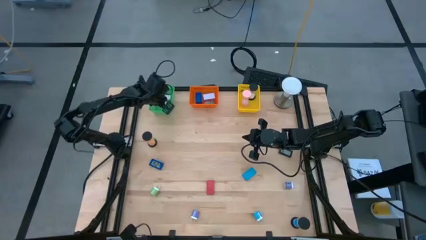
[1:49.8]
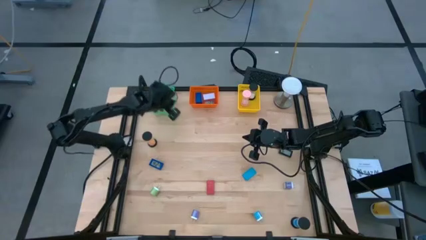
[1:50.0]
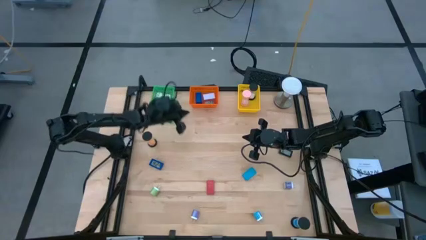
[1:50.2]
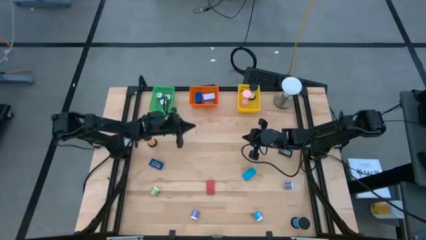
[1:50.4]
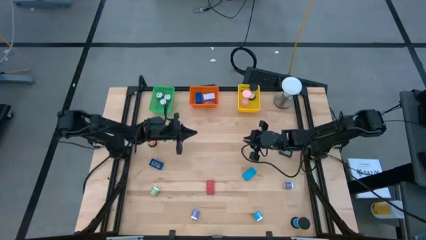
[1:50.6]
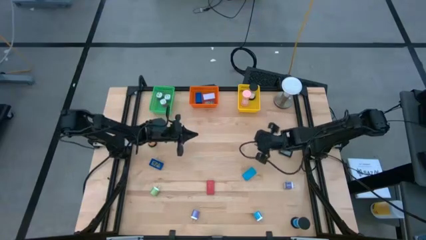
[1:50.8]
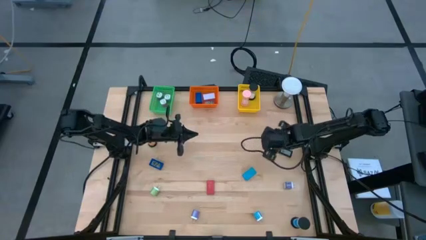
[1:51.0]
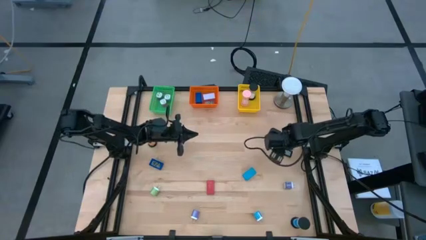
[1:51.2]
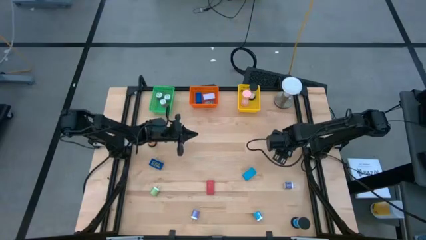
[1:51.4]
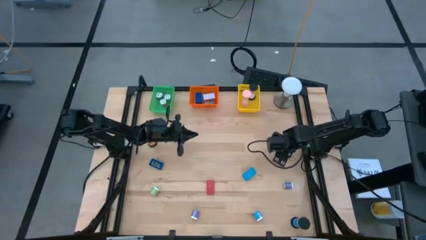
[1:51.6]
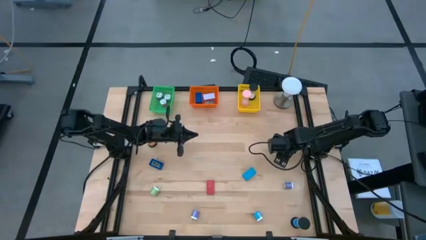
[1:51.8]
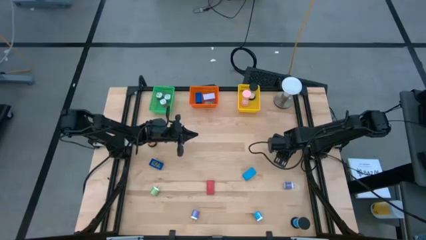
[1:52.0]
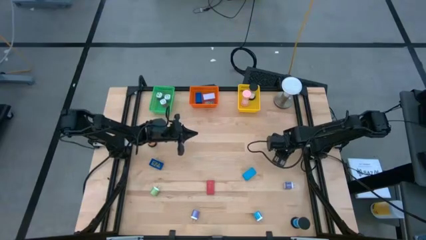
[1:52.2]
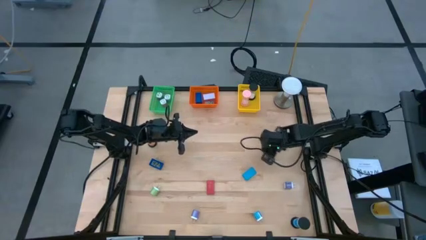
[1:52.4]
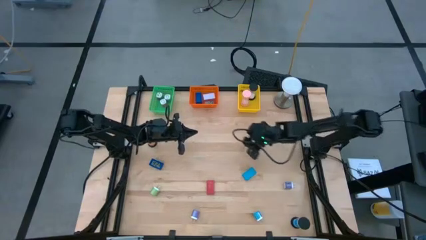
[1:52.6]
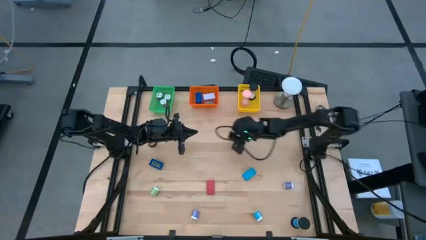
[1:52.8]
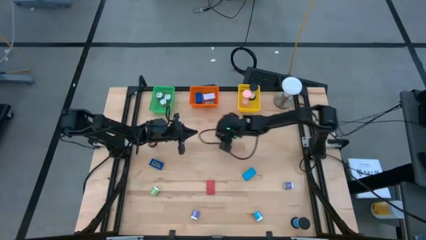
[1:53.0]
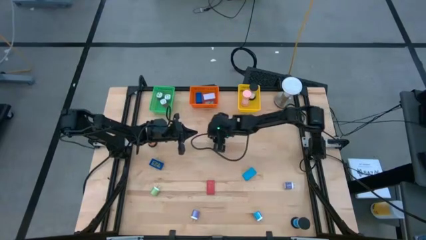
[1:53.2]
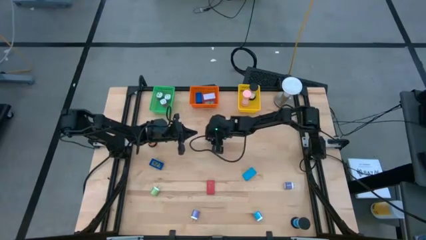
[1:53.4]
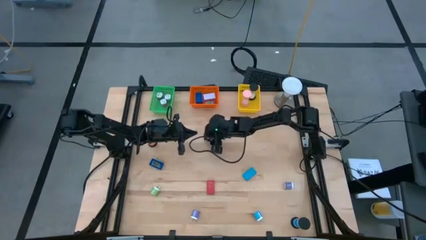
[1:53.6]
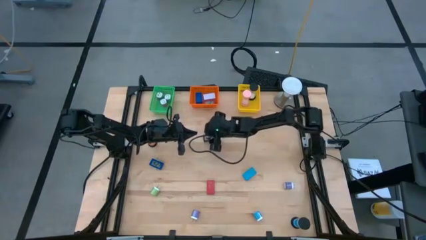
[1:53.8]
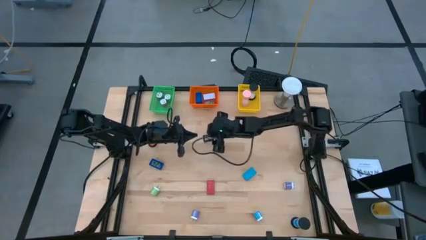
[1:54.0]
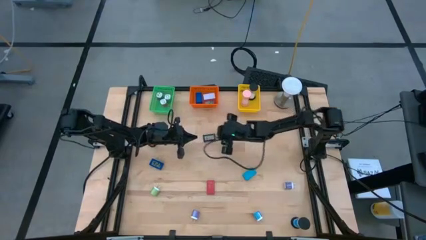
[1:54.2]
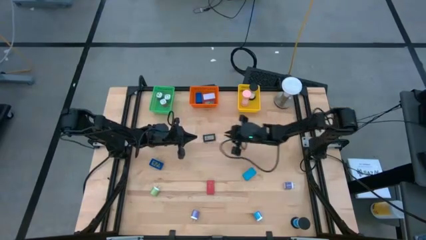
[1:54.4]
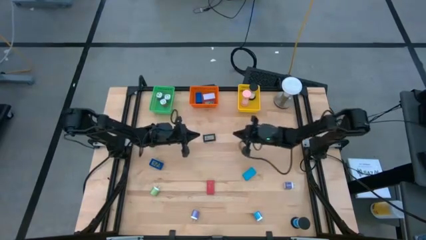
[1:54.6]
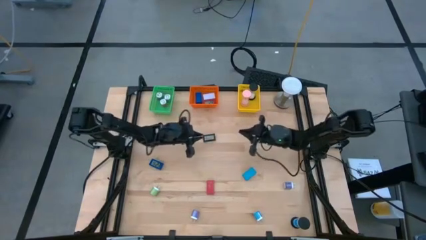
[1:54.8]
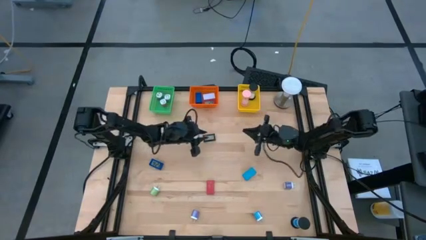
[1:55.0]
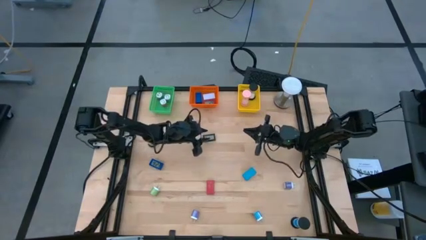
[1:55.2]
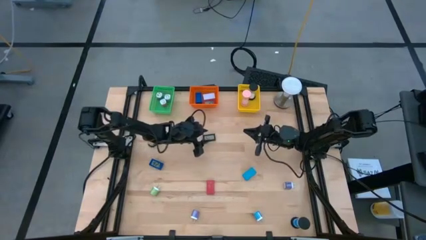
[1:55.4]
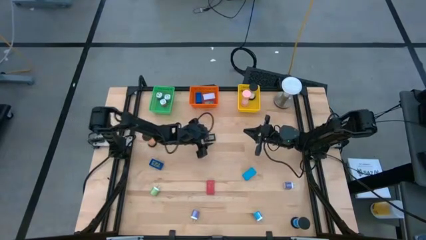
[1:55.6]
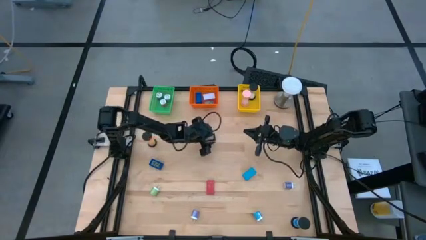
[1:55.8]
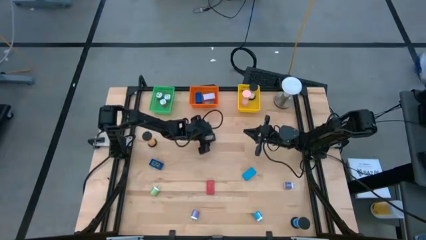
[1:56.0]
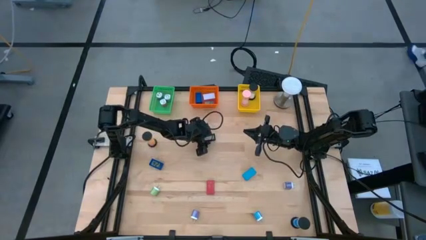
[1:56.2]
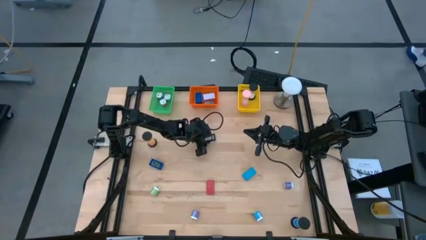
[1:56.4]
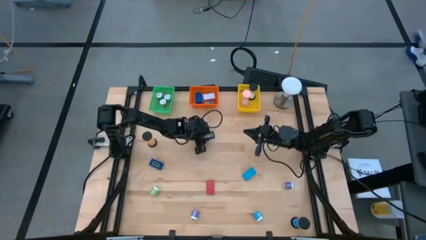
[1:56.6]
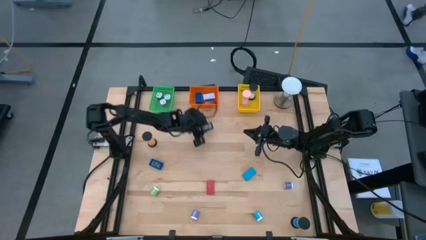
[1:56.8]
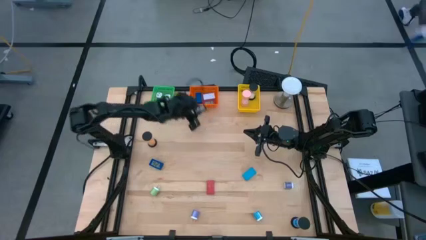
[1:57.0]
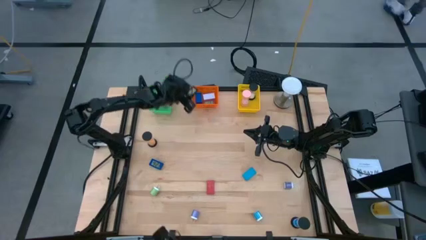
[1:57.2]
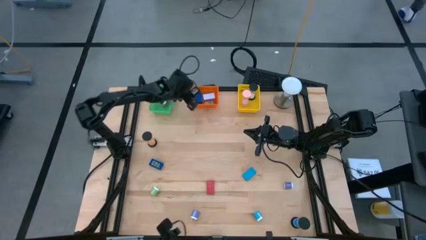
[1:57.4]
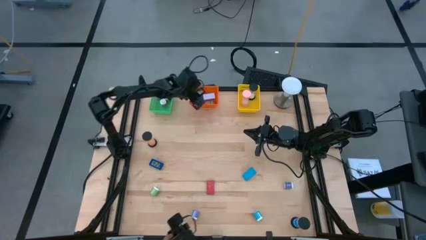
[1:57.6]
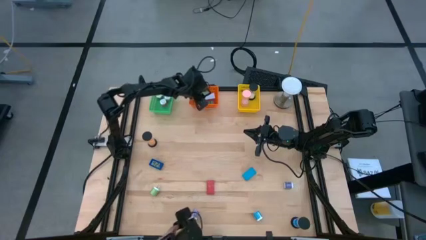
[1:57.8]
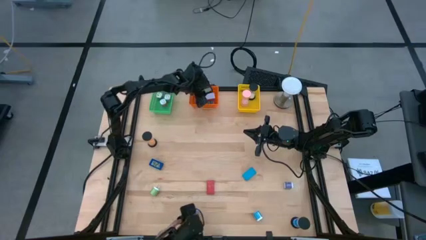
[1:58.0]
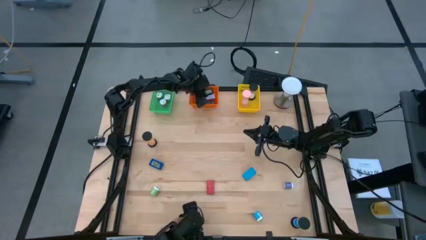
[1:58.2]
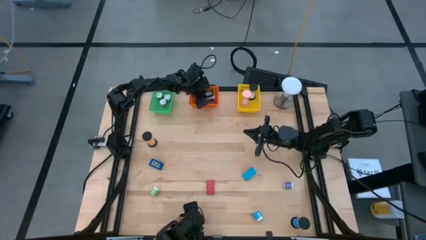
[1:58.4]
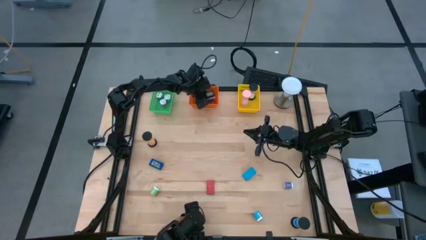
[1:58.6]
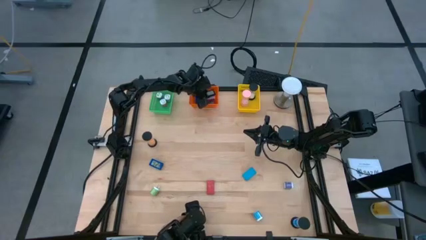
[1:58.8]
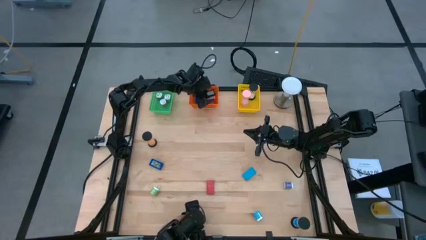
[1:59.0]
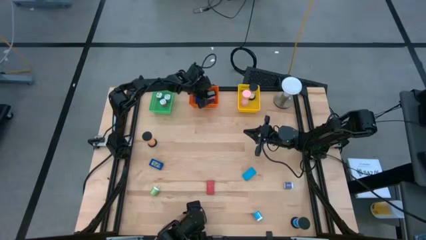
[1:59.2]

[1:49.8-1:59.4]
Task: Pick & Place Office items
Put the black digital clock into the orange bin

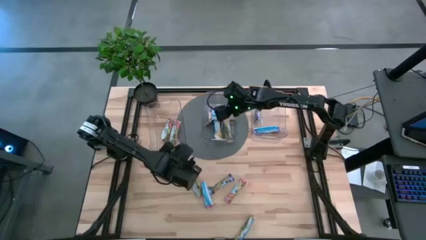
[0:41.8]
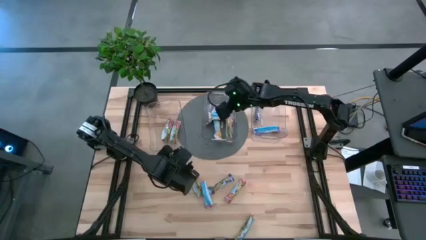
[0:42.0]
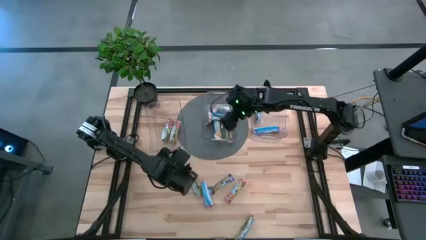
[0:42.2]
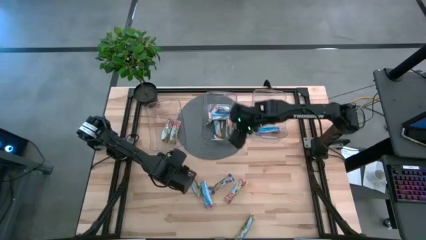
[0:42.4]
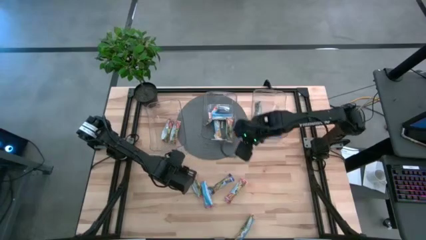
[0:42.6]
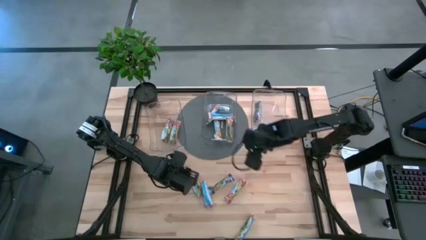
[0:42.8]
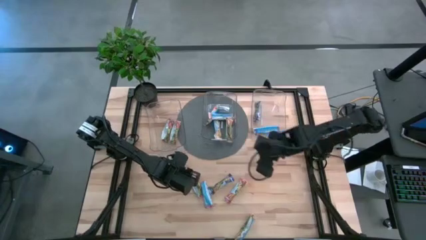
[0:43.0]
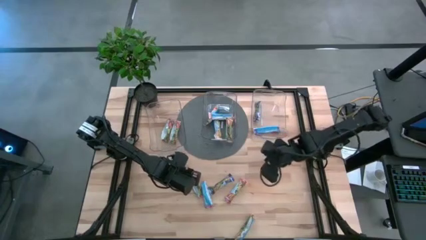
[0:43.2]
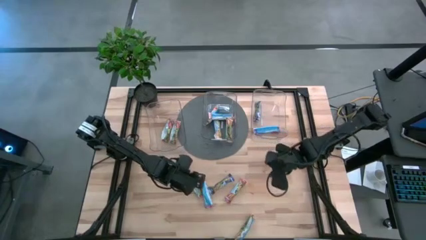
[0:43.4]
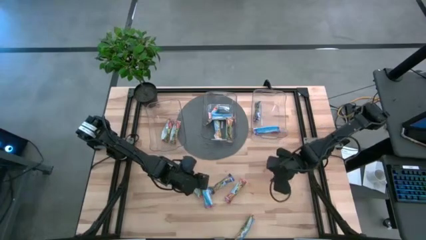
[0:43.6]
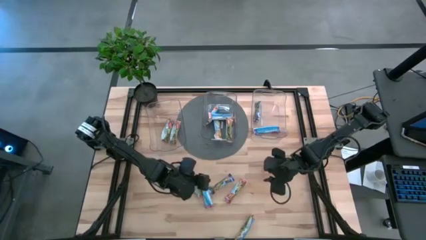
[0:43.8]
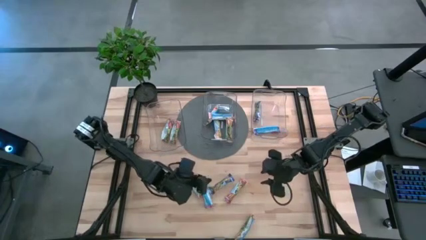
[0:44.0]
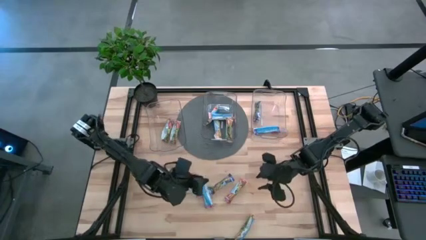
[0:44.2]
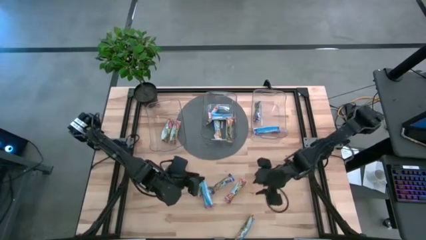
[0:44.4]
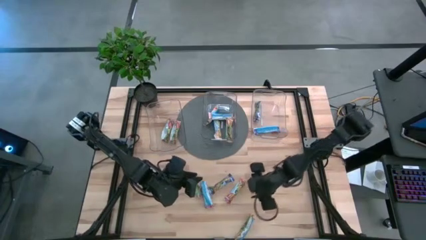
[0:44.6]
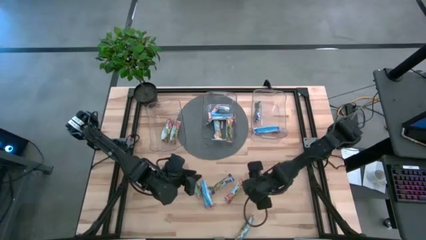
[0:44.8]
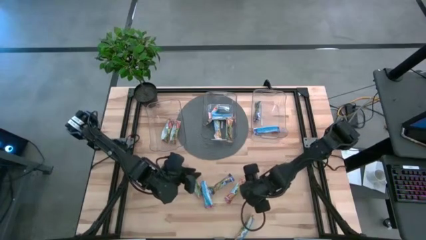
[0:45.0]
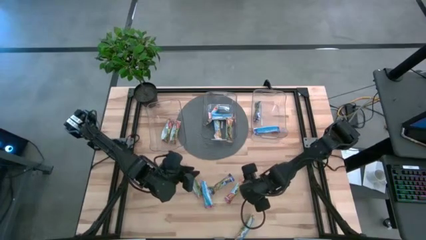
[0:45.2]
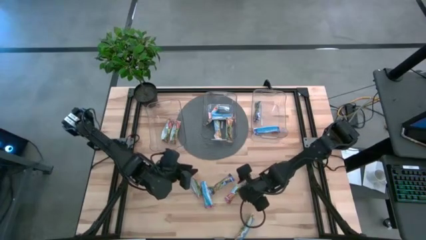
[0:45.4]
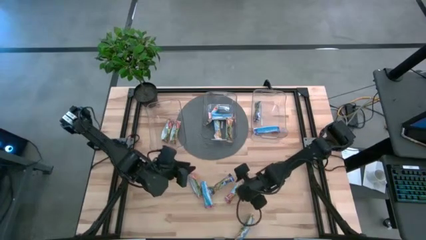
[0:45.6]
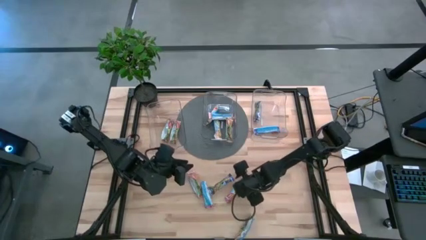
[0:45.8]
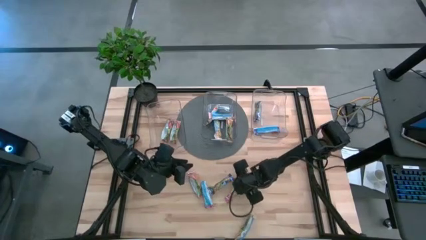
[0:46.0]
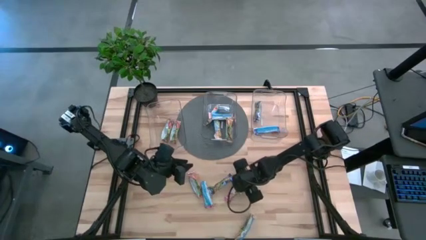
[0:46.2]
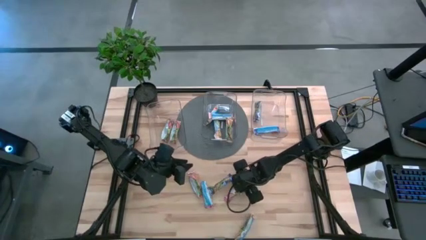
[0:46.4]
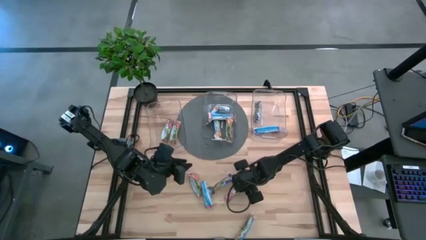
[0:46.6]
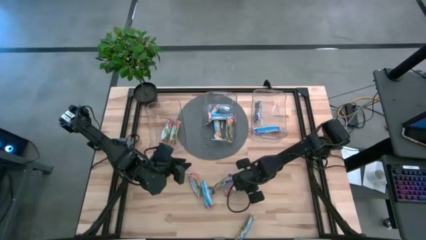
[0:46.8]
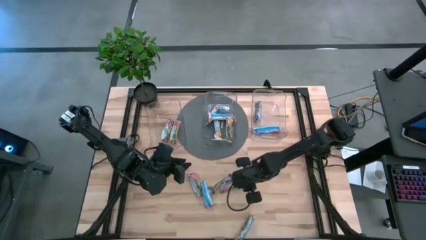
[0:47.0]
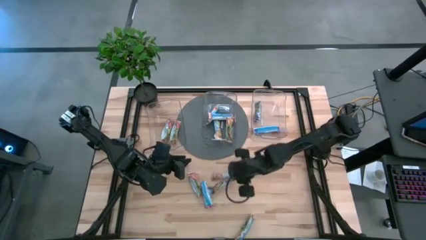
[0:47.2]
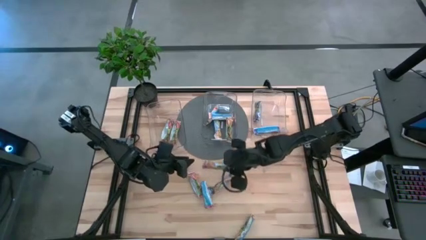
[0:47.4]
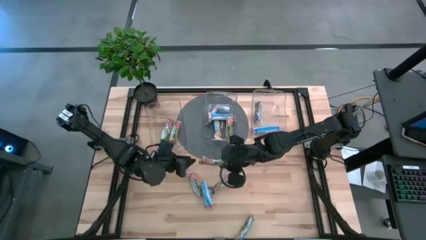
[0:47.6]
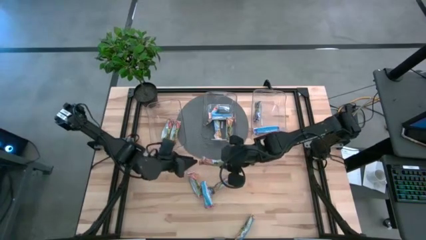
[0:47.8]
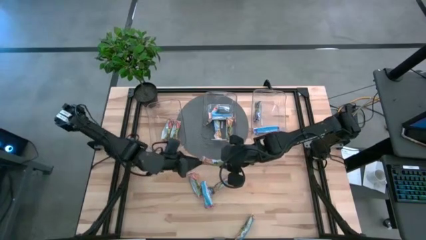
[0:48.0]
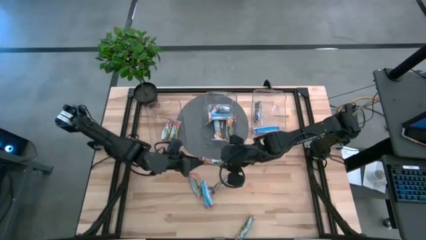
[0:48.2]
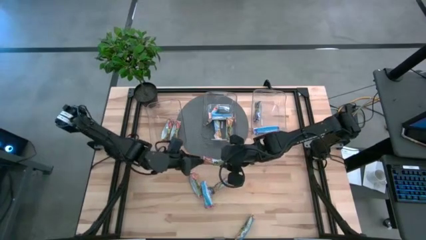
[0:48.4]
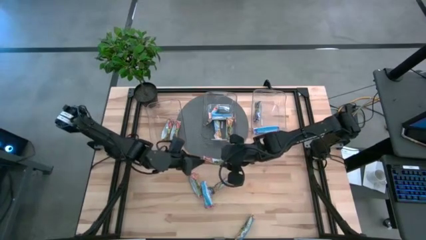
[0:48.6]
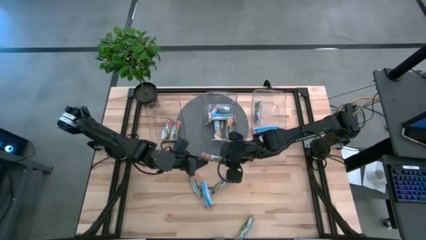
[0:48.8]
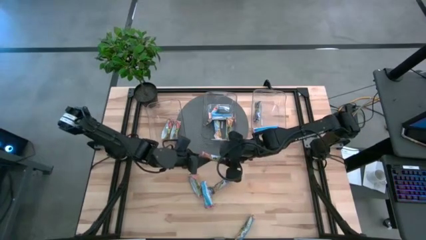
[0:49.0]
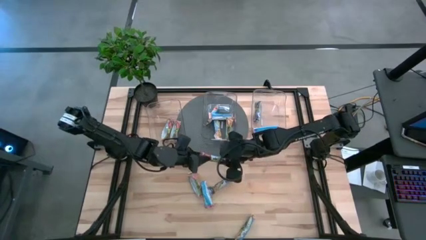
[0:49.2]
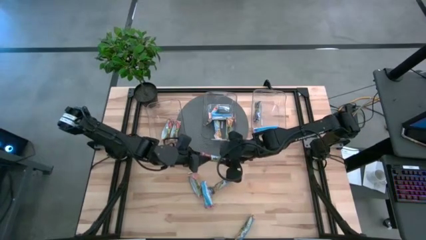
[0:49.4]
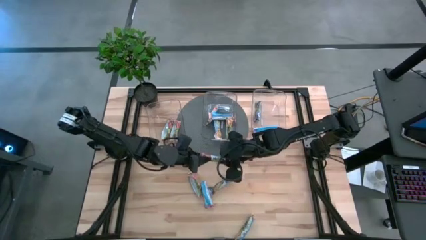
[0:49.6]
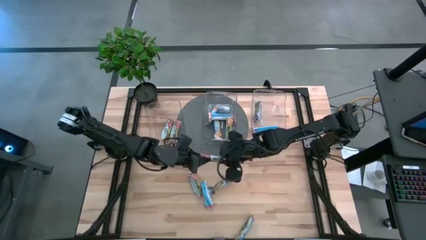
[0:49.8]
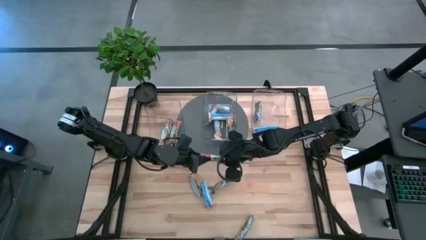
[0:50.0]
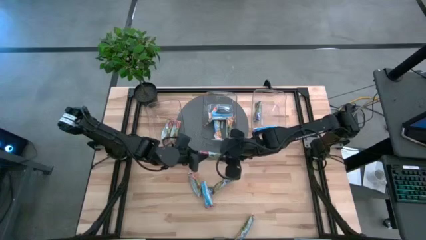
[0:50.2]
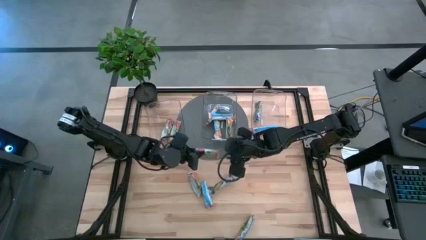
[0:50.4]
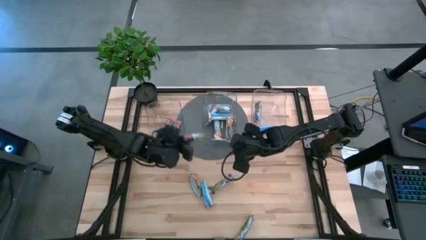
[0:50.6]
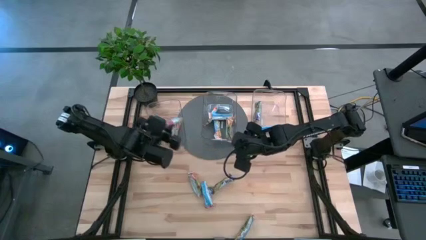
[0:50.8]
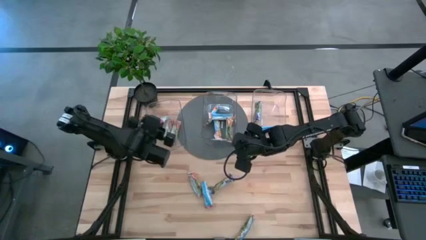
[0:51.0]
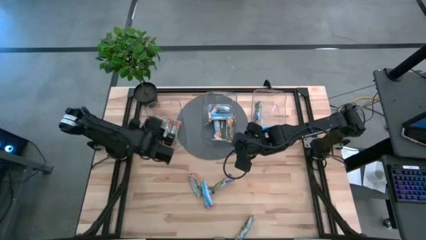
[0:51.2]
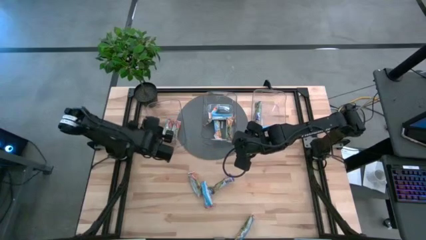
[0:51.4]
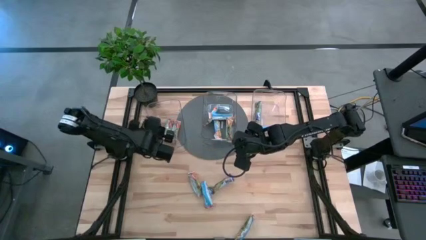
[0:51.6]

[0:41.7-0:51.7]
Task: Pick and place Granola Bars by type
Put the red granola bar into the left transparent bin
